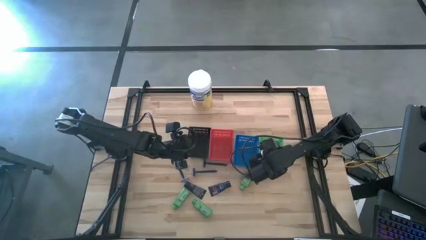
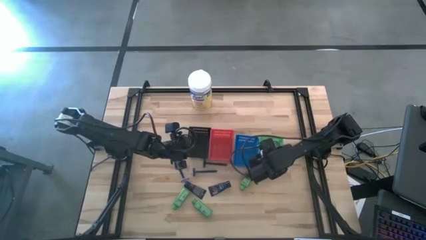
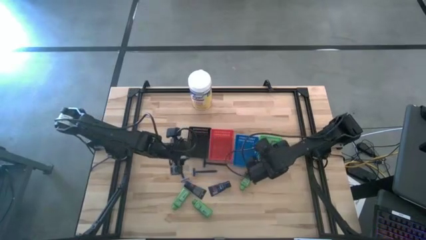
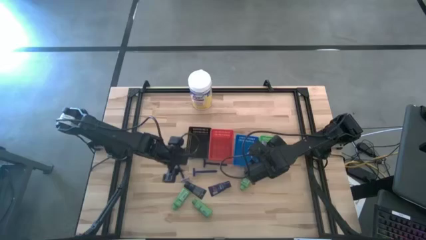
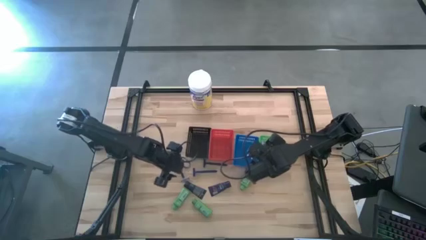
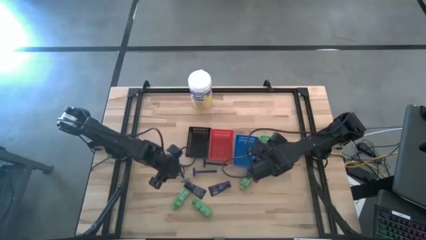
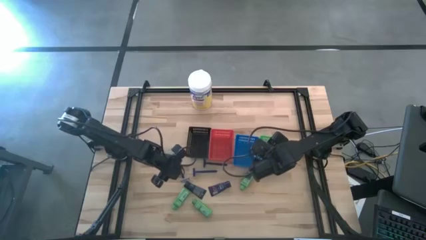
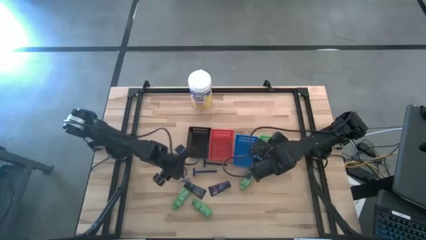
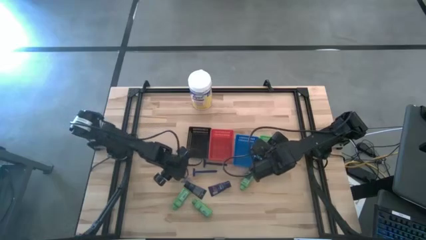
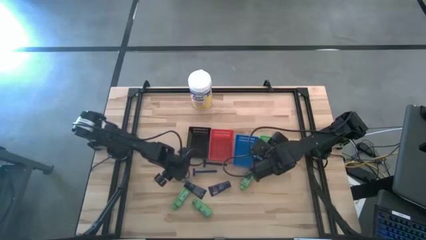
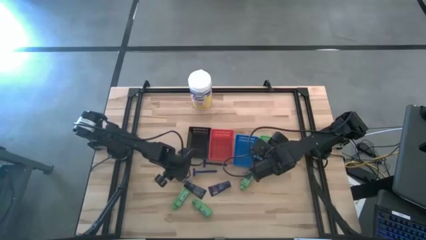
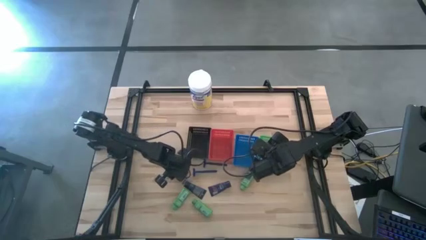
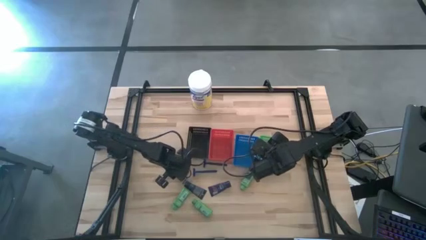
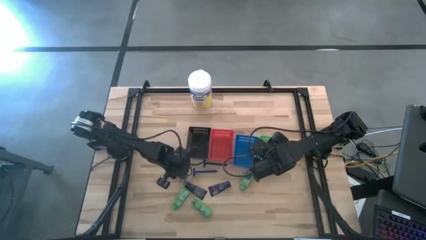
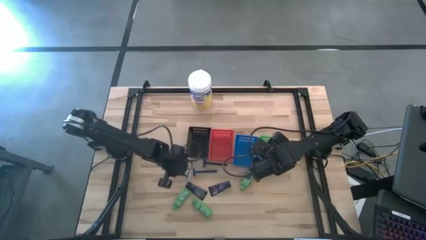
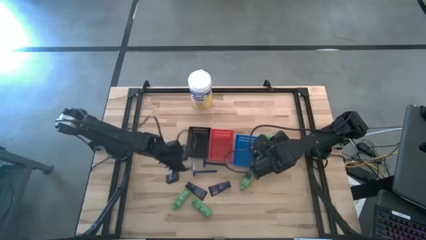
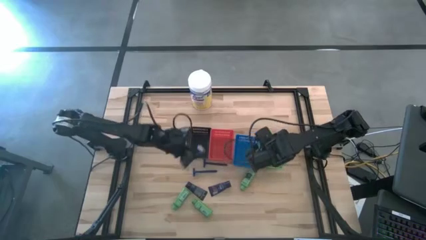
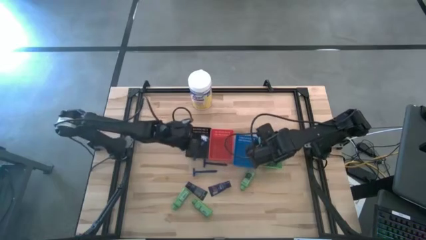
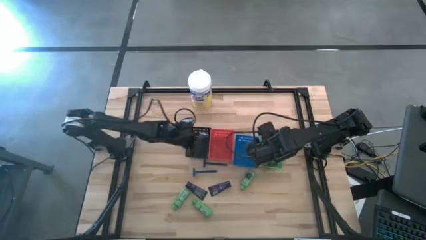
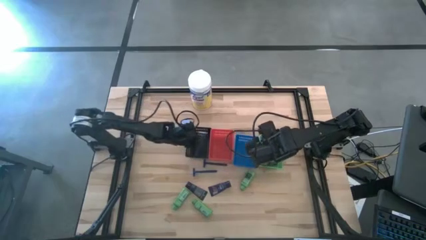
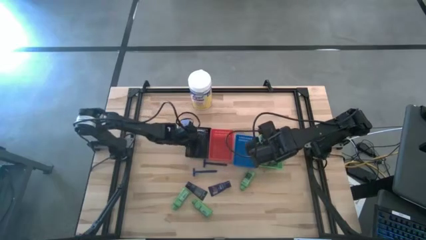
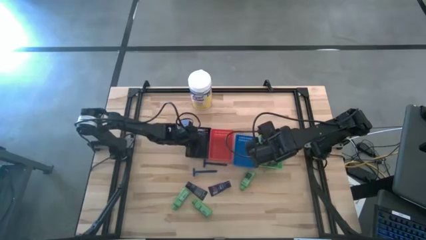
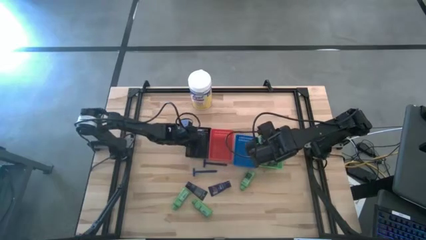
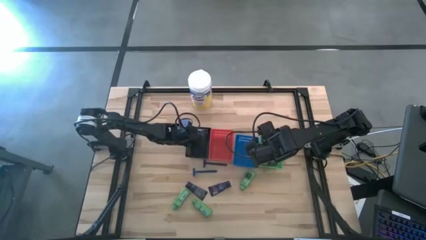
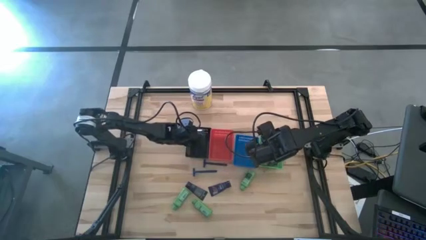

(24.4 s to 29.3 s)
Task: Pick & Place Travel size toiletries
Put the blue razor into the black bin

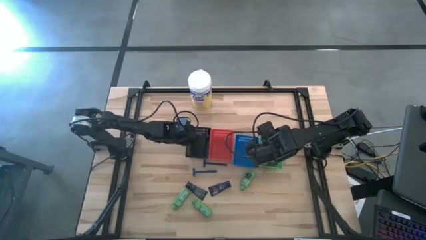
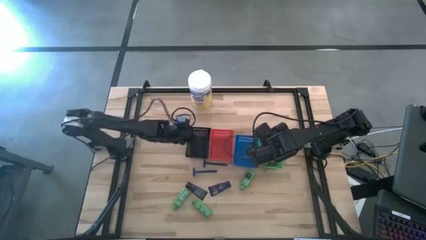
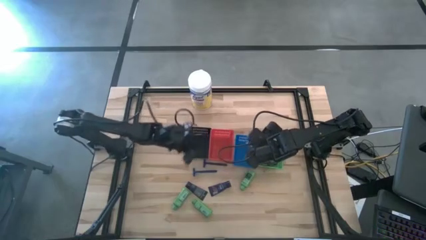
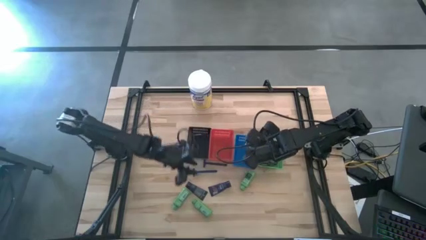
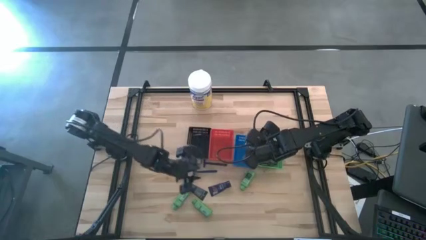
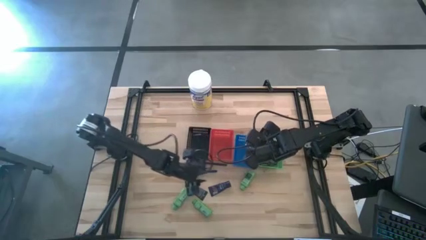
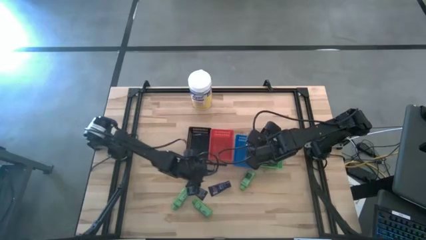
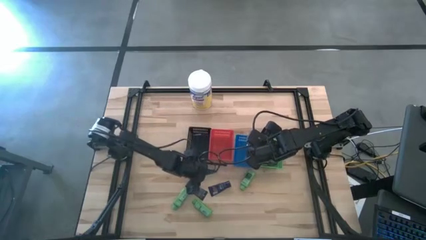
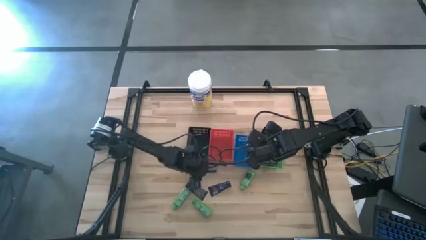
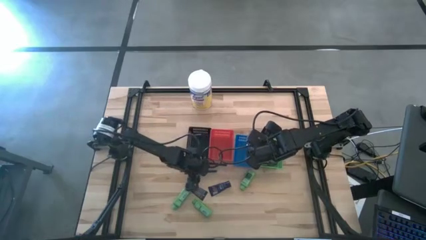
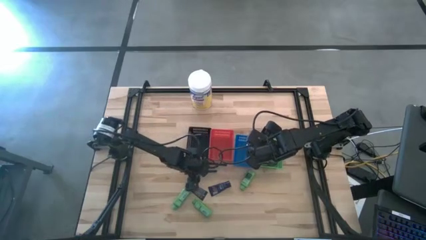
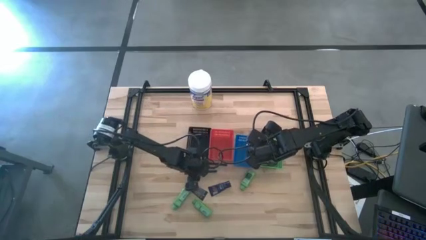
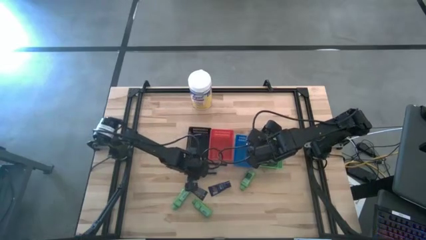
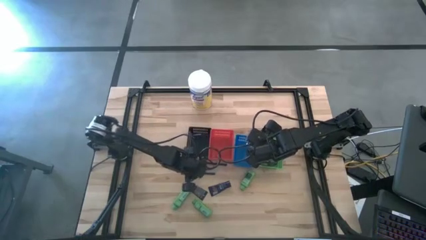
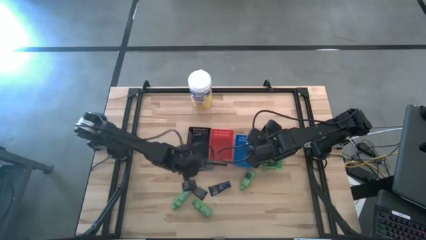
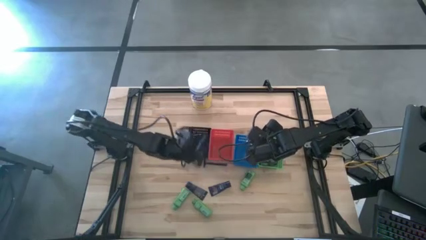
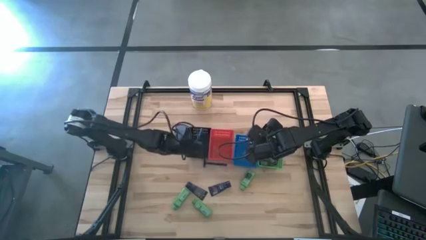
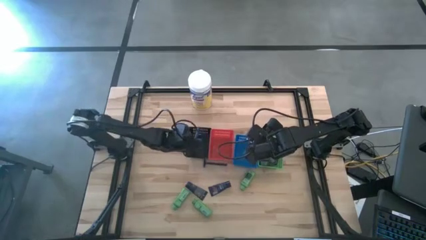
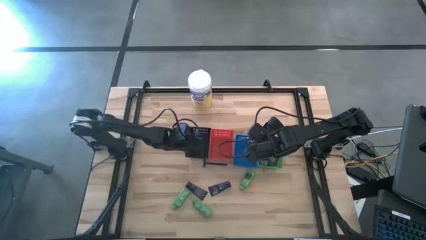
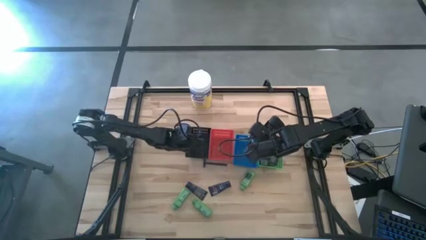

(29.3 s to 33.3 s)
Put the blue razor into the black bin

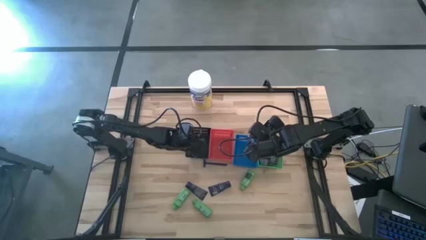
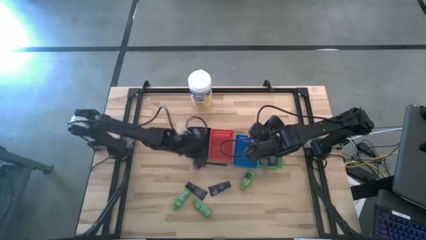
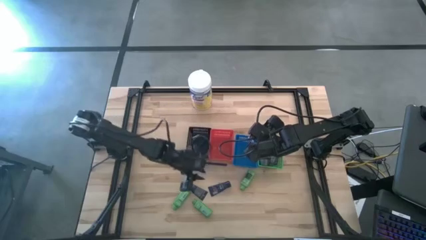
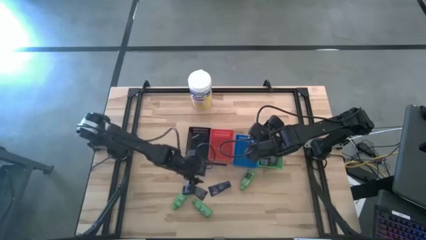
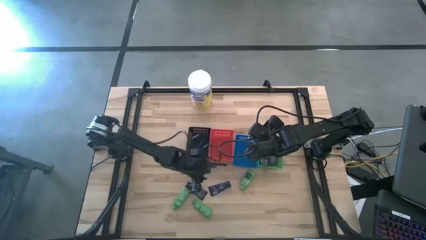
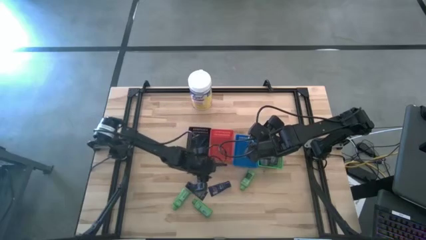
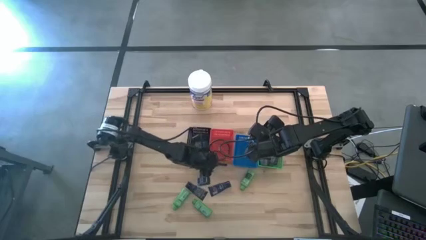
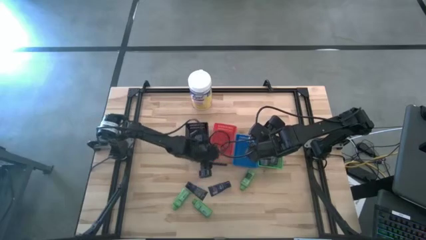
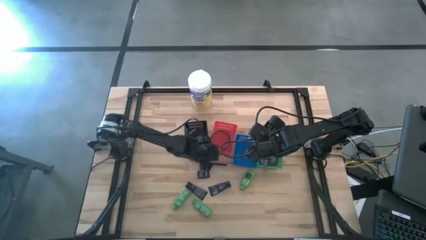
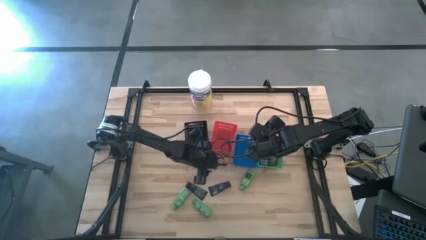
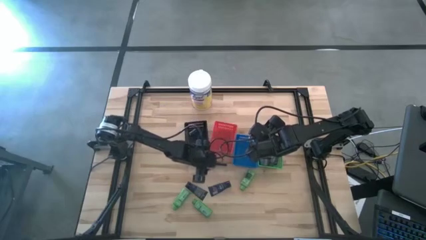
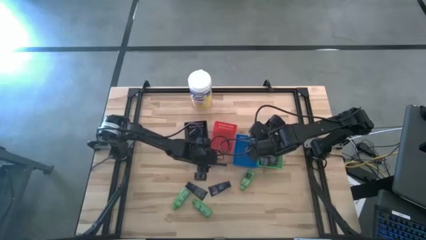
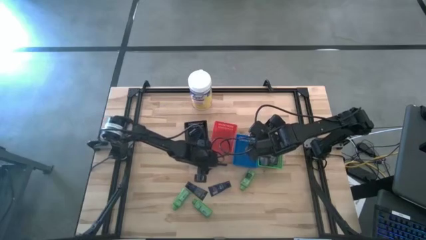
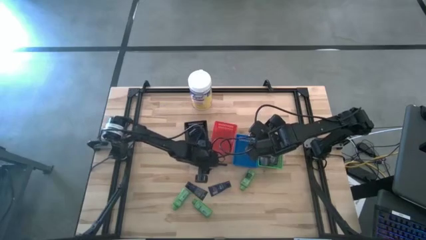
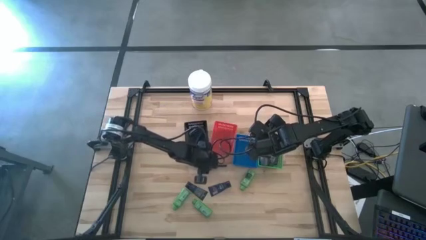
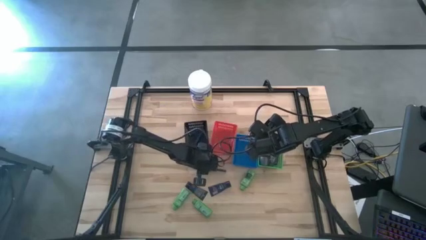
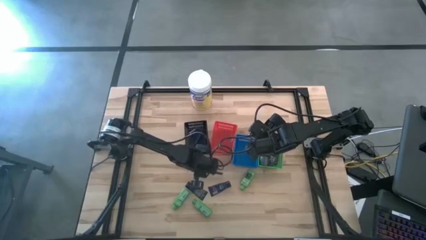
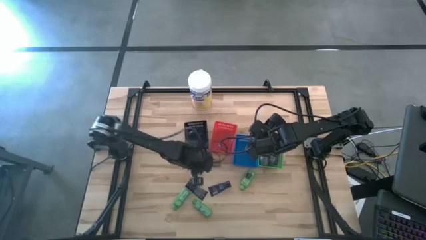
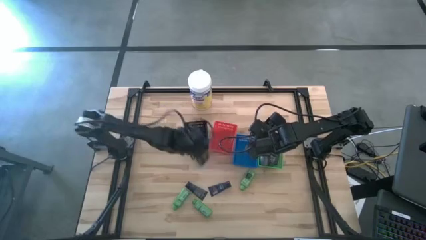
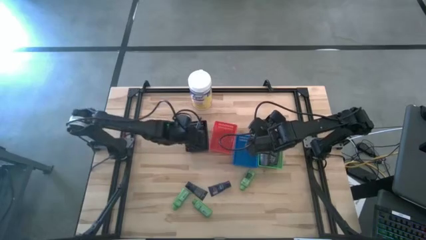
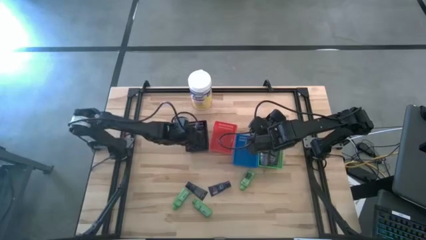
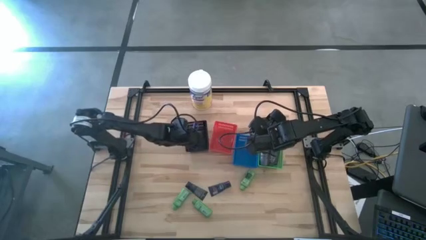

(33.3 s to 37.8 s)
Put the blue razor into the black bin

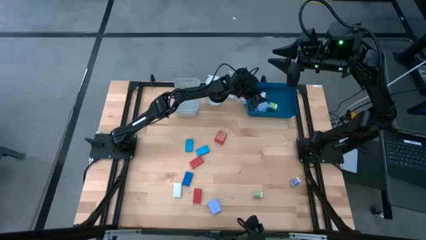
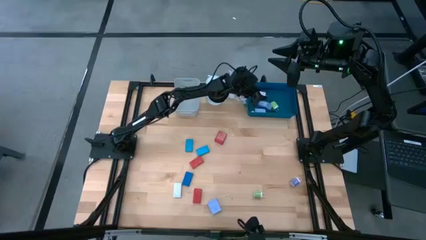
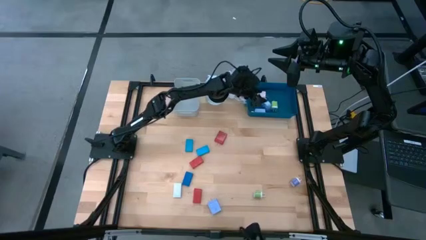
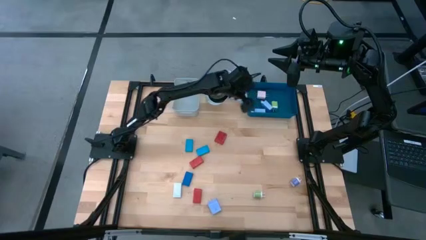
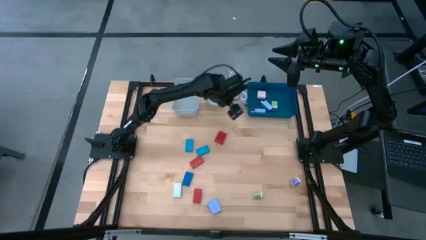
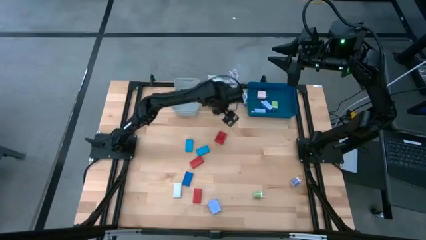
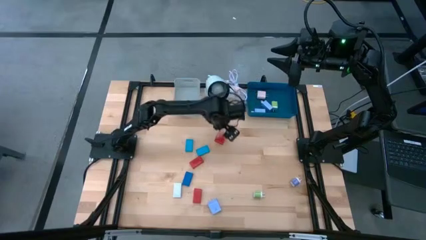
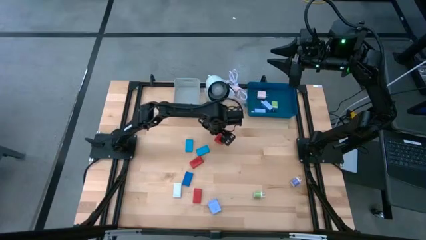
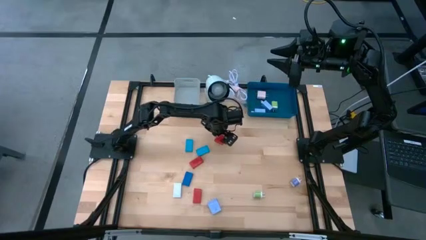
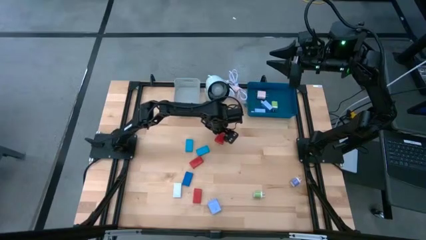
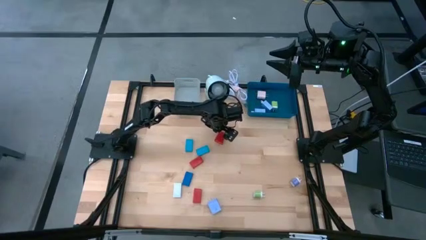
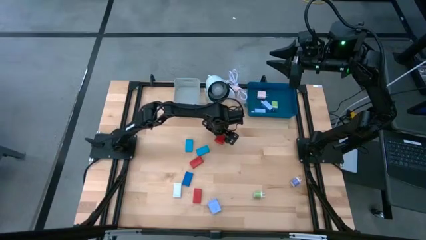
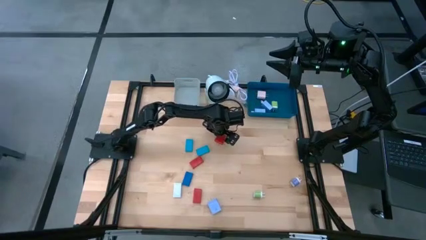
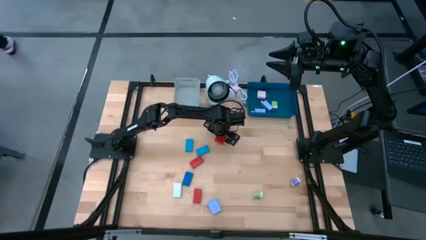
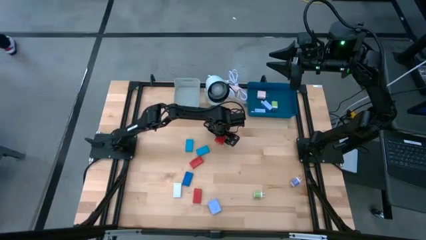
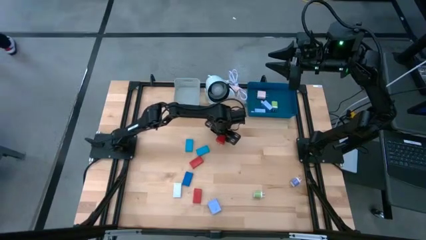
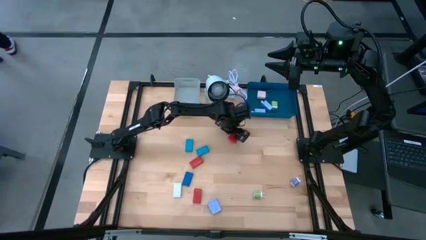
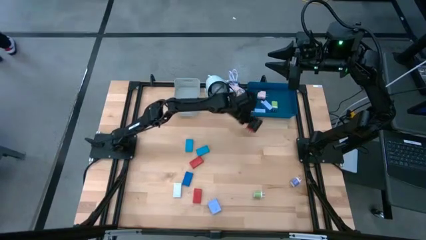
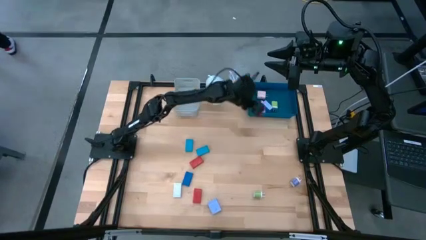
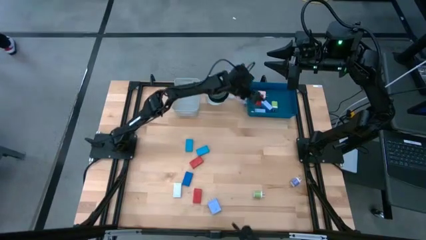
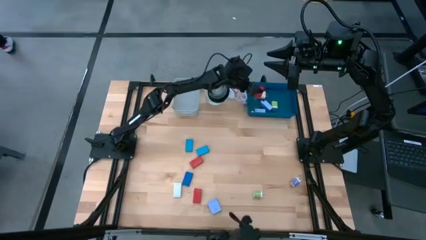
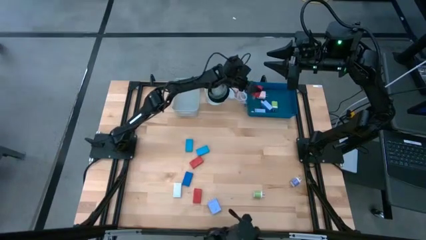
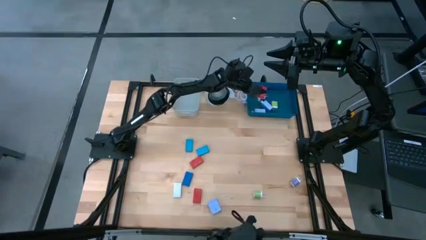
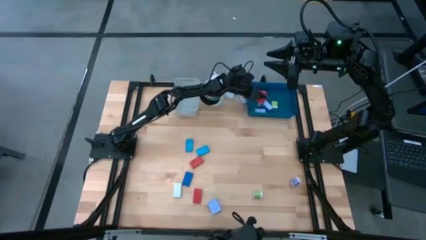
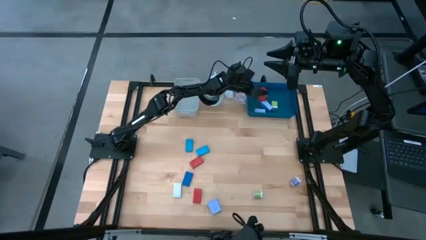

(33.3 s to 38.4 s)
Task: Pick & Place Office items
Put the red charger adapter into the blue bin
